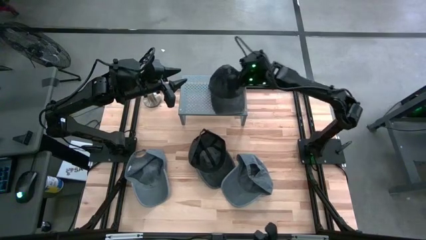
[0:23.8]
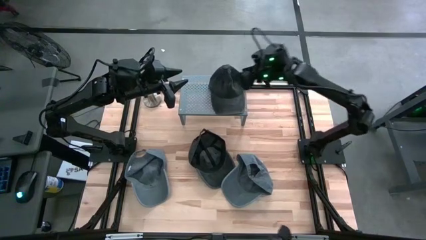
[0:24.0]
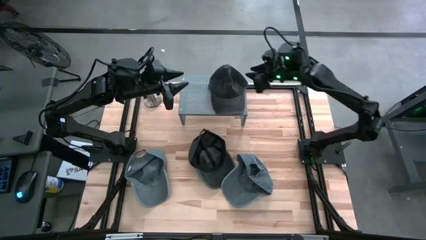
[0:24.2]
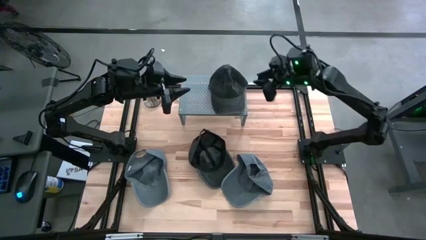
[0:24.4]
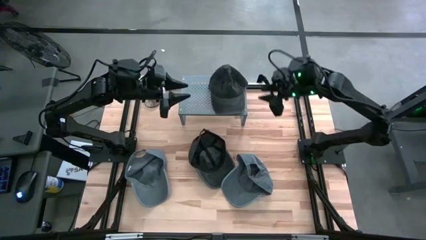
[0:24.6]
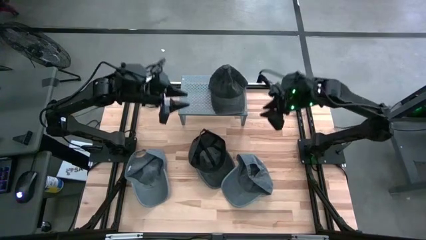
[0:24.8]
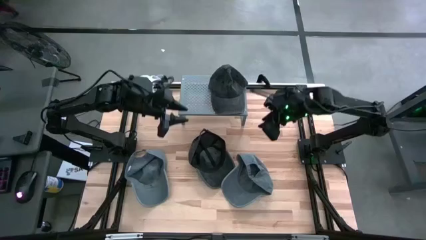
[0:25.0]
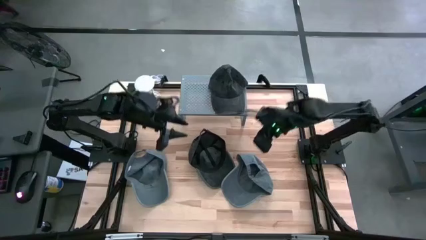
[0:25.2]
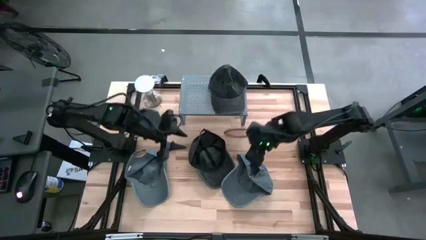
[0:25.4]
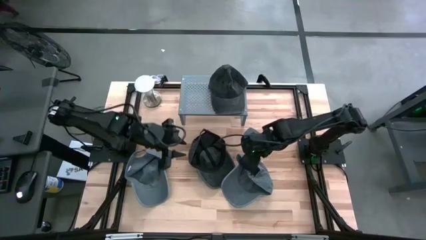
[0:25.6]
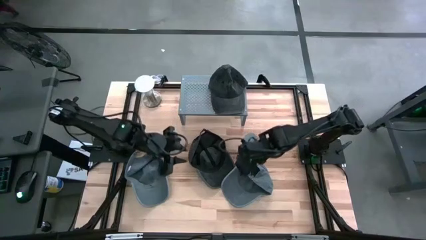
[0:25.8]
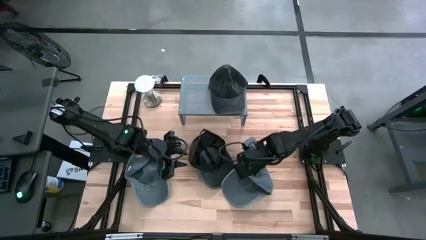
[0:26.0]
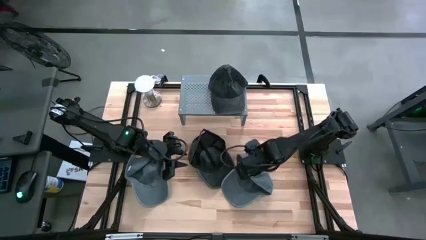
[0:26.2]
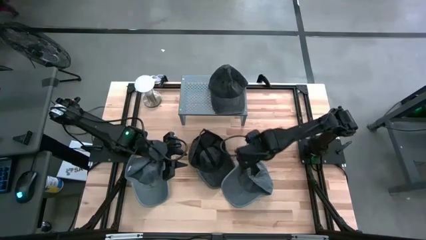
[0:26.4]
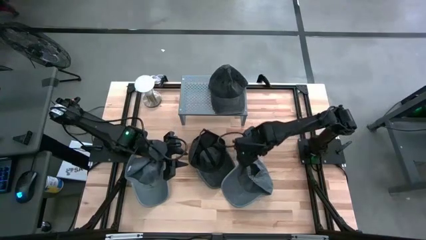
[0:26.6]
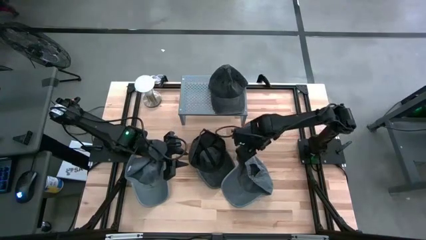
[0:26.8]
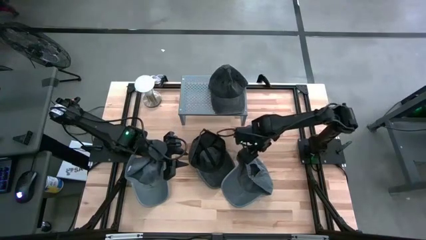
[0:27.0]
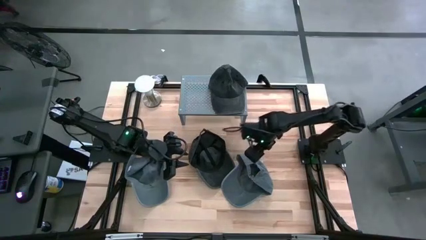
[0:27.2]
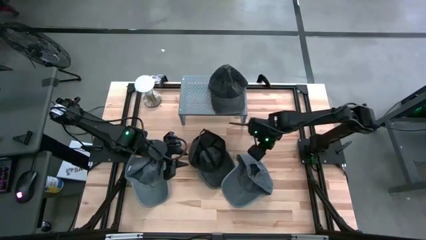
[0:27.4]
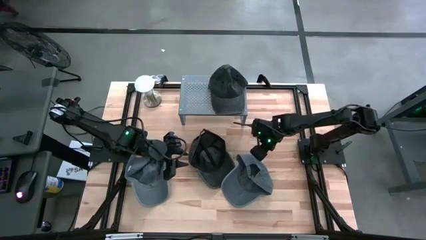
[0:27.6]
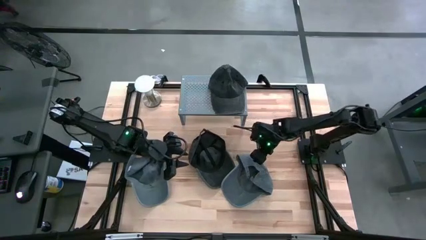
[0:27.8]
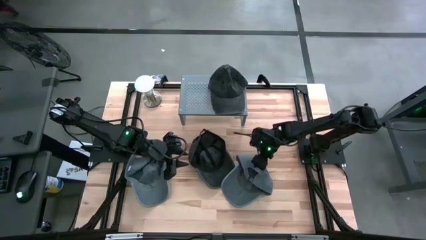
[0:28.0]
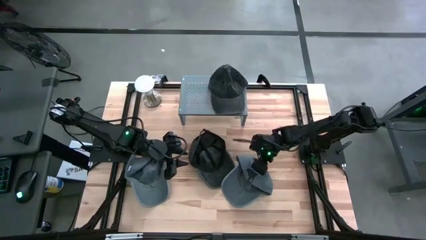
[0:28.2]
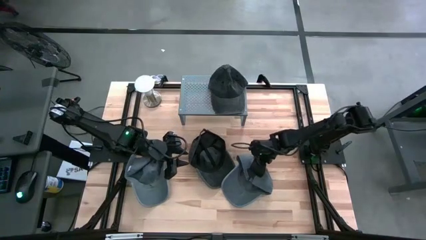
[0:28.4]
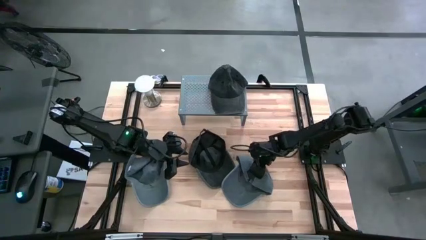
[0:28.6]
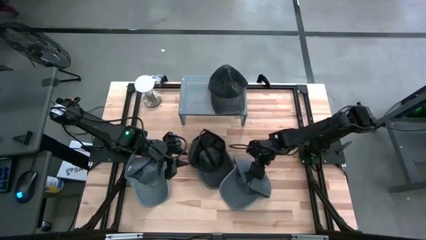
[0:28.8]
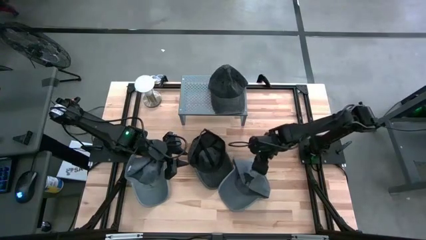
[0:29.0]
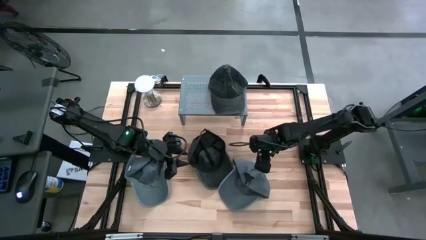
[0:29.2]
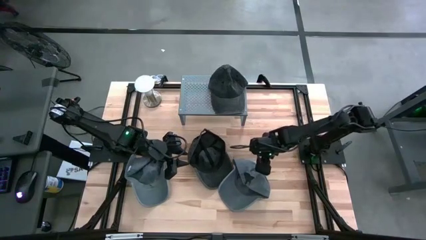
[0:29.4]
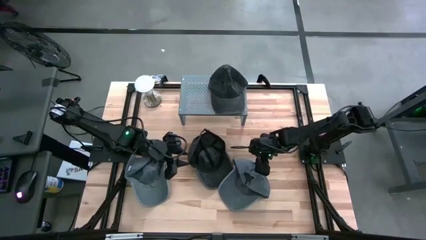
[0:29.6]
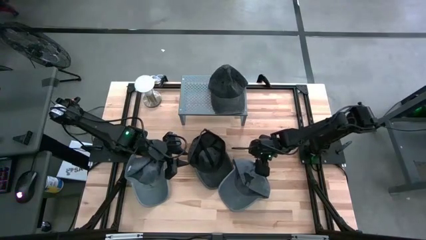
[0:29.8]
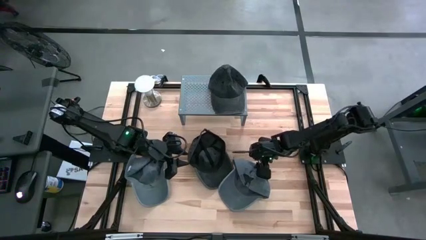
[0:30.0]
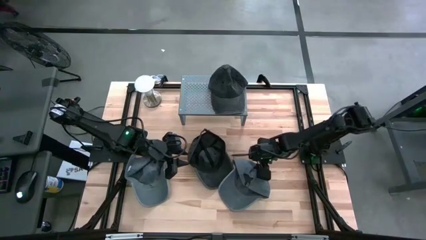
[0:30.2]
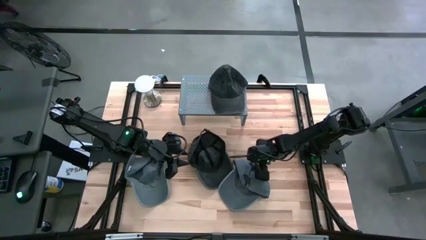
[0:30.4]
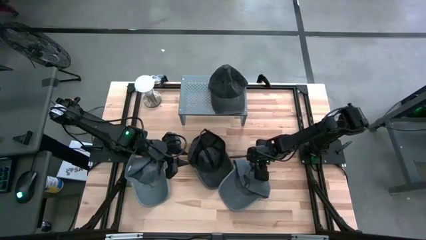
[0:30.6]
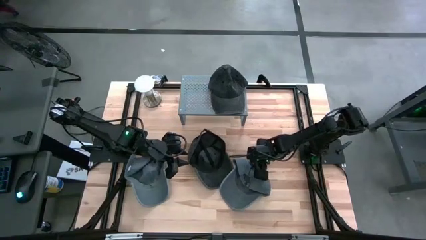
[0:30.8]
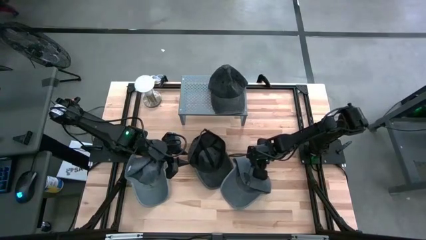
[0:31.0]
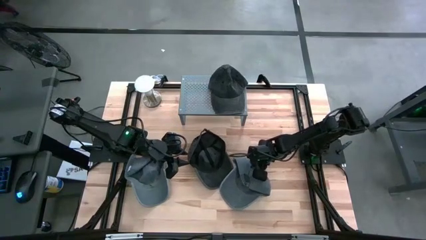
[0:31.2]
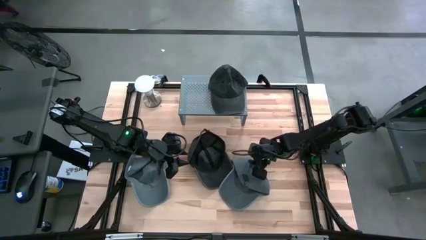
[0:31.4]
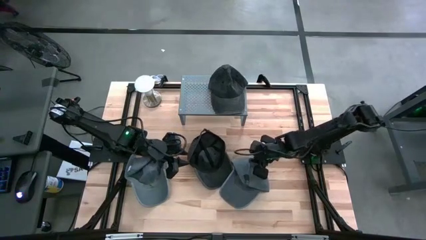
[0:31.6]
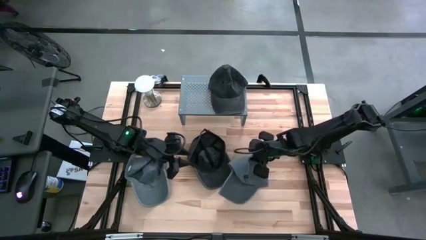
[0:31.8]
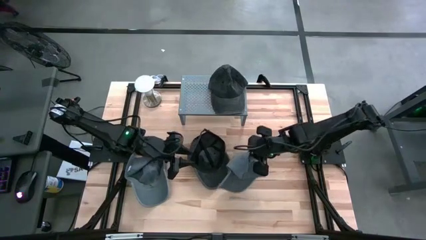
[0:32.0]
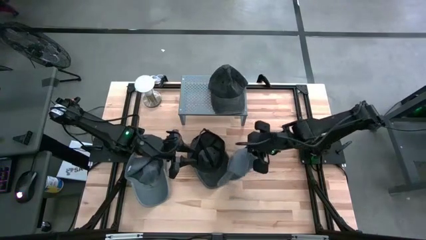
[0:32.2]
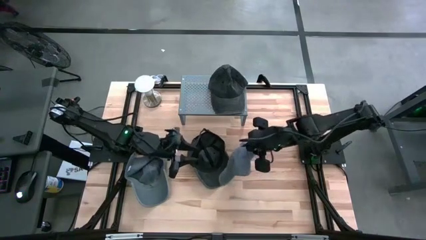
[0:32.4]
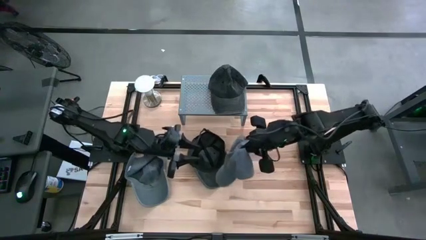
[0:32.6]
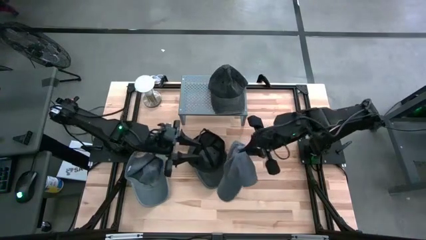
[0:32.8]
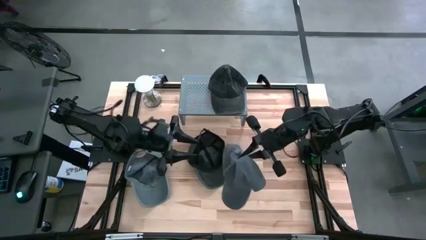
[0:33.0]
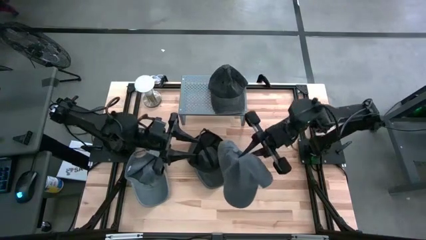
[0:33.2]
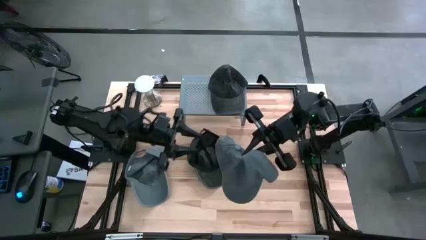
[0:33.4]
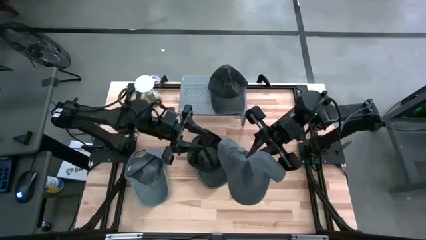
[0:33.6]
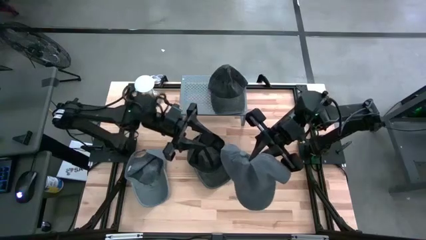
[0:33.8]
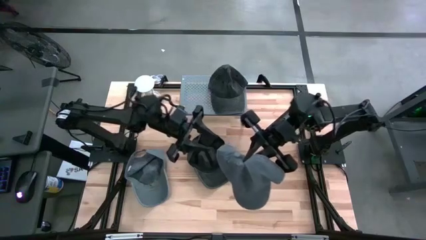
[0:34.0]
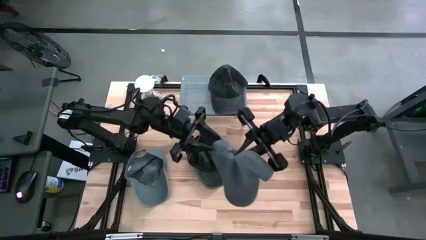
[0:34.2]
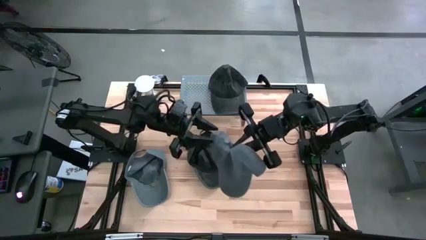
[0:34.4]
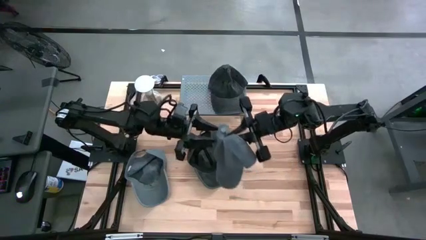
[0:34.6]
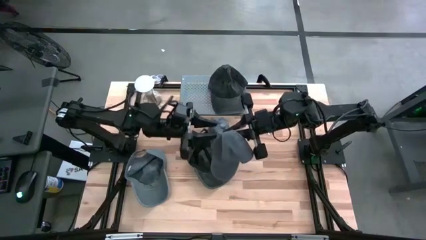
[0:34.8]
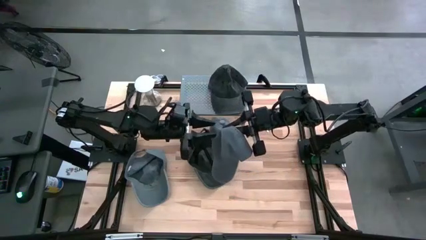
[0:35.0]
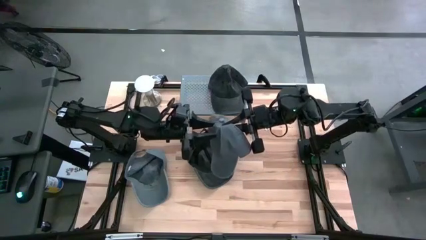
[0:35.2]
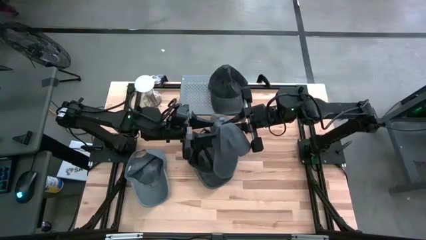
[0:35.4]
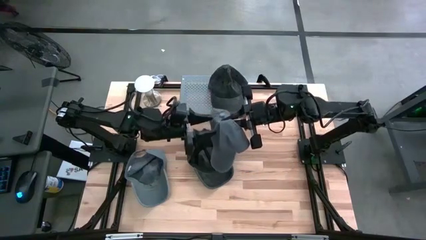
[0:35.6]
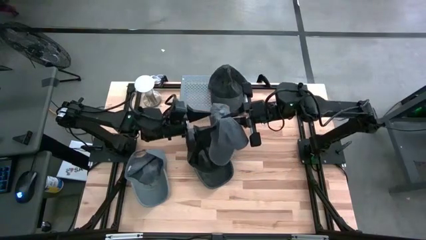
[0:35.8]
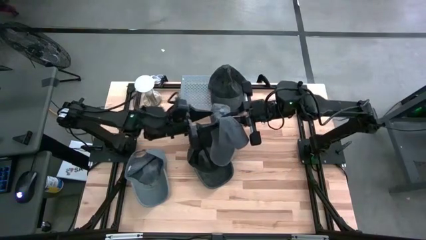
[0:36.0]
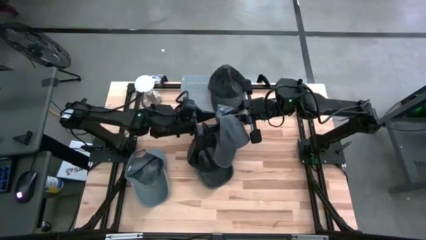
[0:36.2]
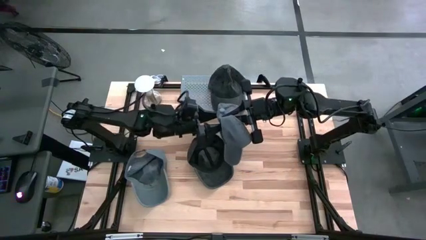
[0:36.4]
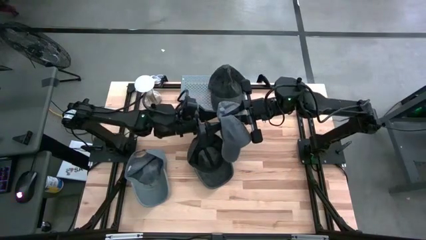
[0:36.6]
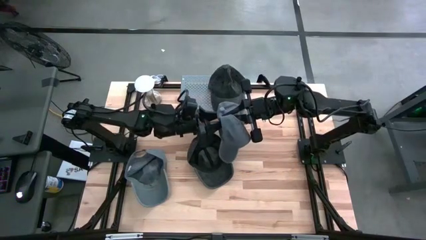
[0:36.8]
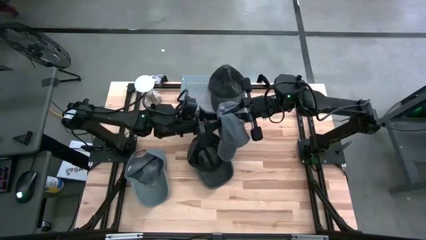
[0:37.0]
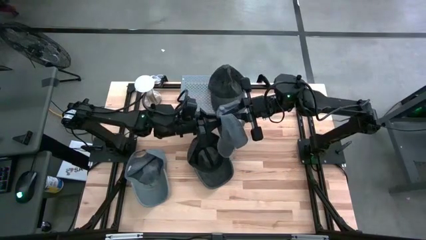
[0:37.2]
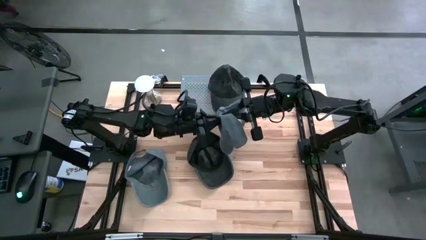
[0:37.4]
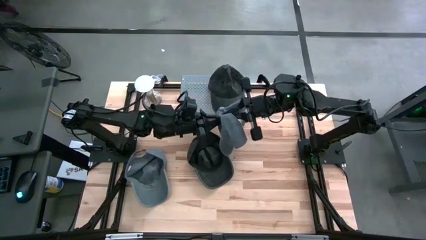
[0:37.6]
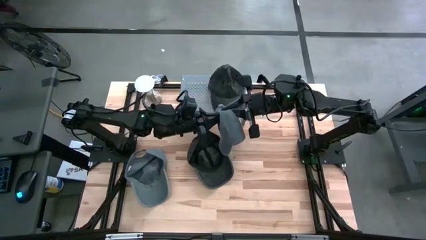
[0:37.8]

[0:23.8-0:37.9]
Task: Pick & Place hat
Put the right gray cap on the shelf
